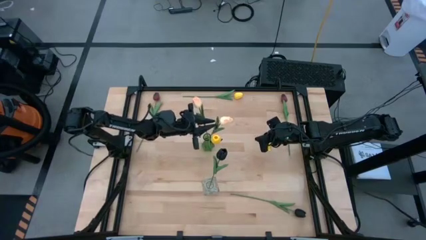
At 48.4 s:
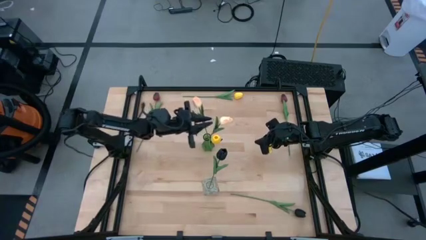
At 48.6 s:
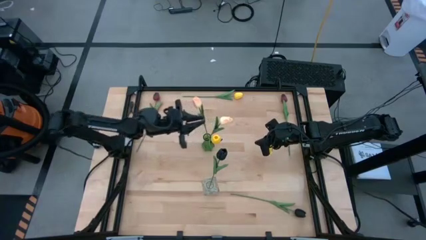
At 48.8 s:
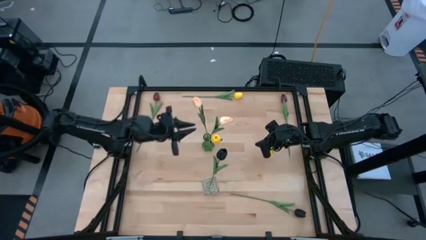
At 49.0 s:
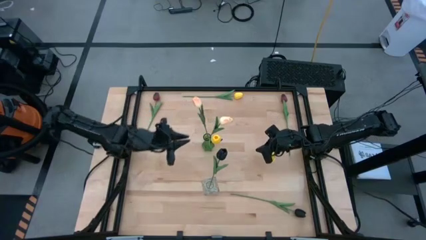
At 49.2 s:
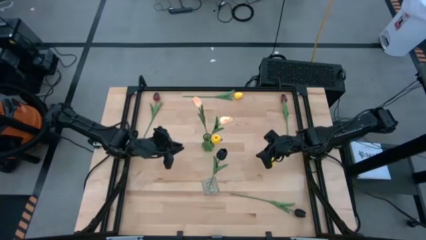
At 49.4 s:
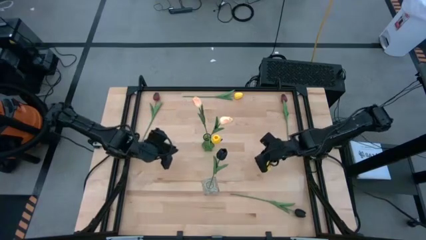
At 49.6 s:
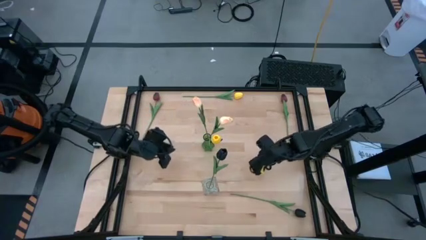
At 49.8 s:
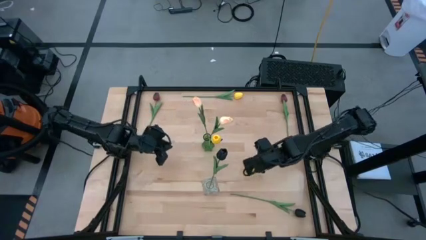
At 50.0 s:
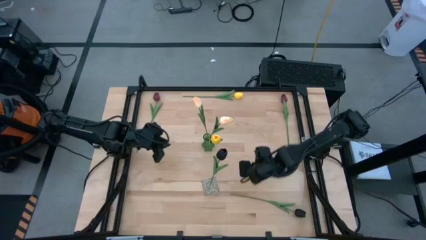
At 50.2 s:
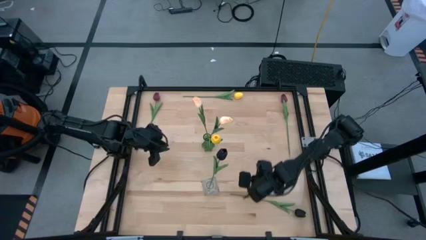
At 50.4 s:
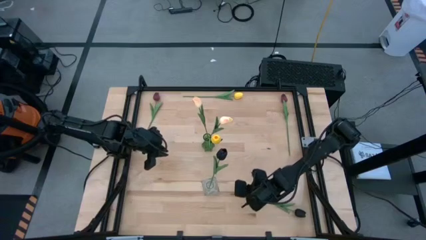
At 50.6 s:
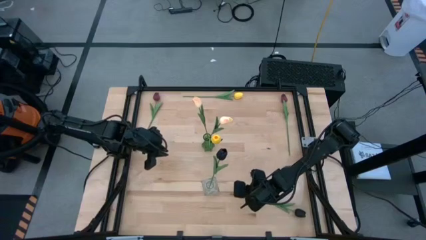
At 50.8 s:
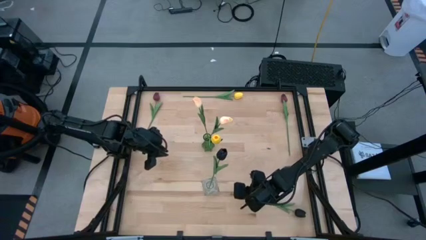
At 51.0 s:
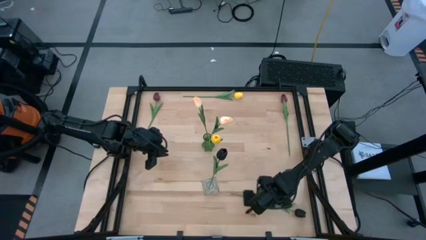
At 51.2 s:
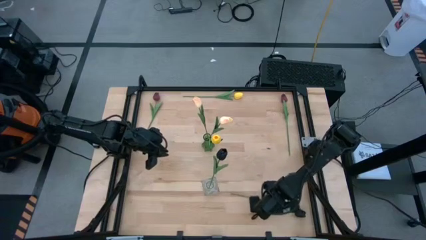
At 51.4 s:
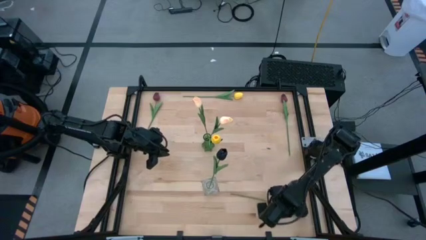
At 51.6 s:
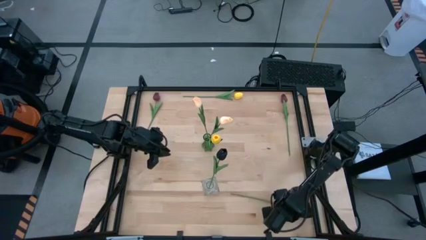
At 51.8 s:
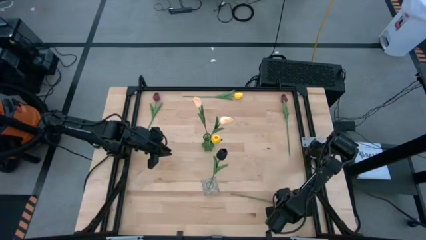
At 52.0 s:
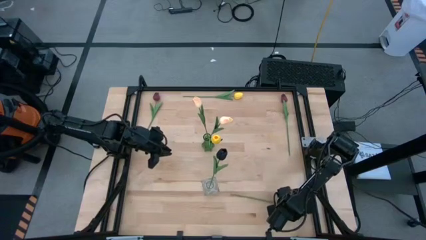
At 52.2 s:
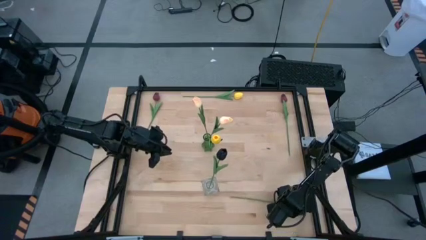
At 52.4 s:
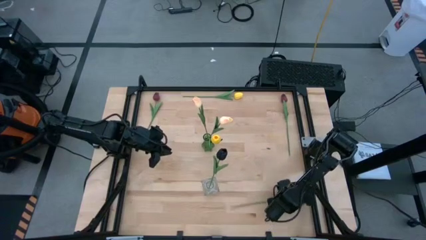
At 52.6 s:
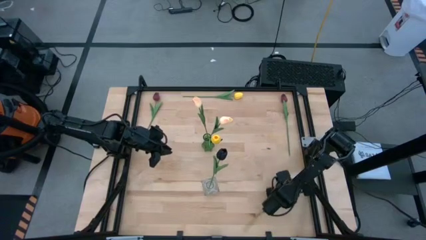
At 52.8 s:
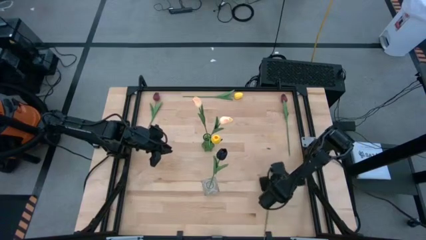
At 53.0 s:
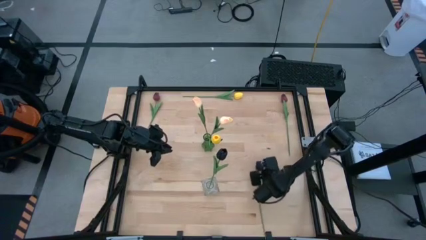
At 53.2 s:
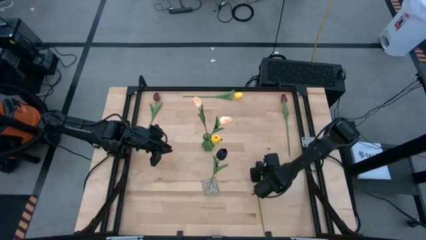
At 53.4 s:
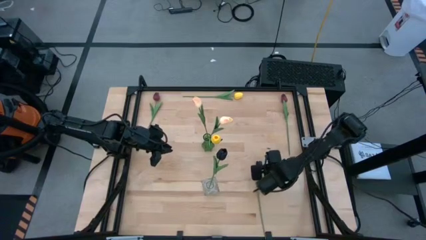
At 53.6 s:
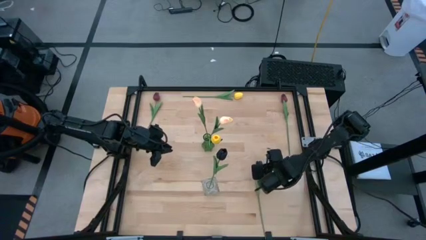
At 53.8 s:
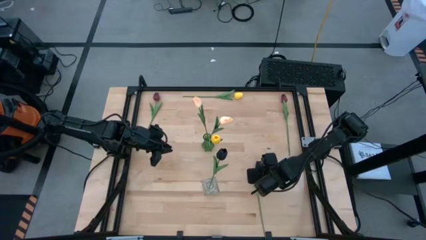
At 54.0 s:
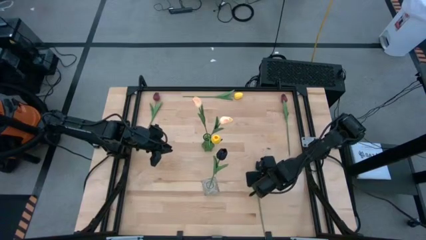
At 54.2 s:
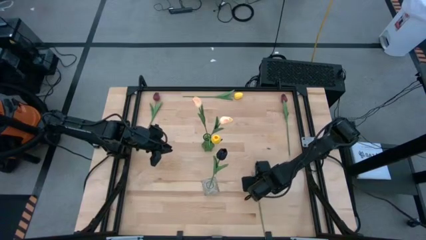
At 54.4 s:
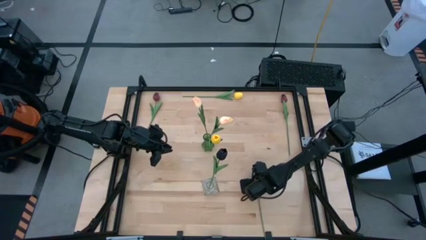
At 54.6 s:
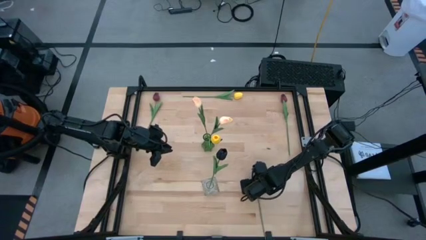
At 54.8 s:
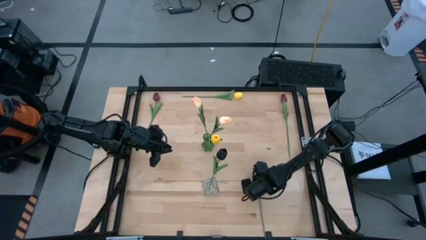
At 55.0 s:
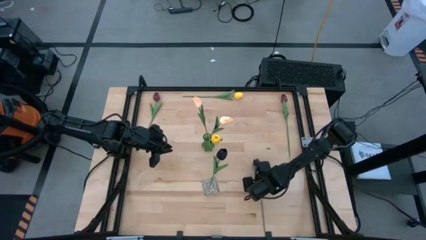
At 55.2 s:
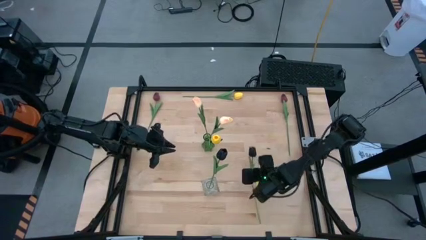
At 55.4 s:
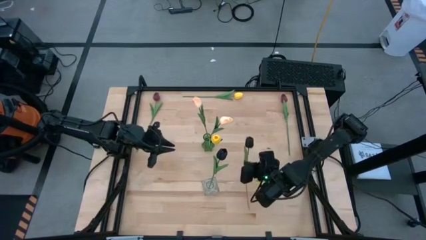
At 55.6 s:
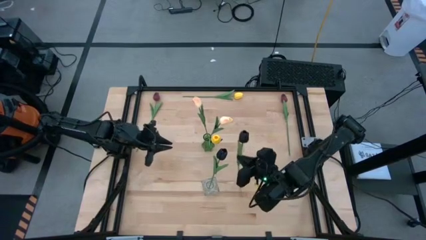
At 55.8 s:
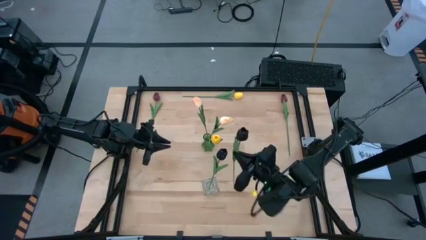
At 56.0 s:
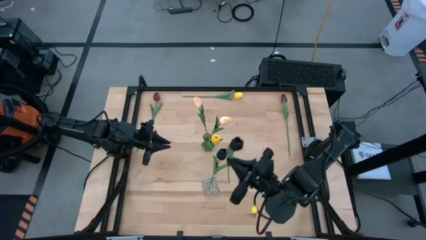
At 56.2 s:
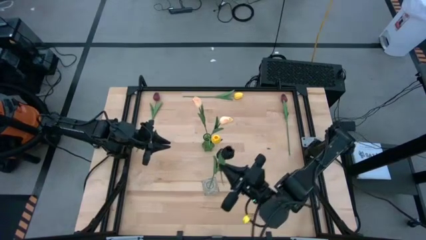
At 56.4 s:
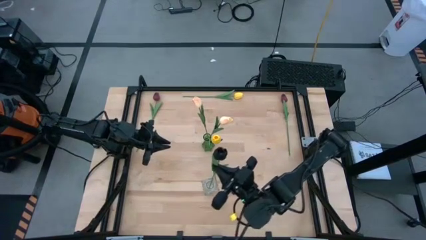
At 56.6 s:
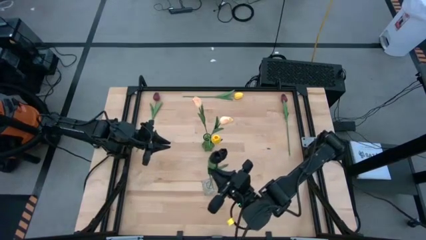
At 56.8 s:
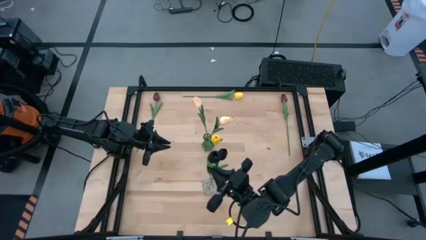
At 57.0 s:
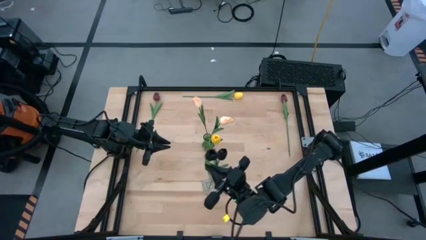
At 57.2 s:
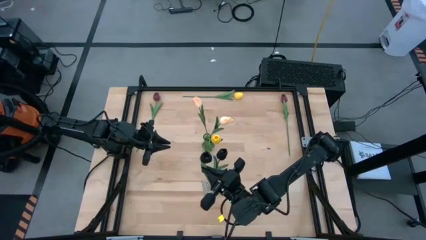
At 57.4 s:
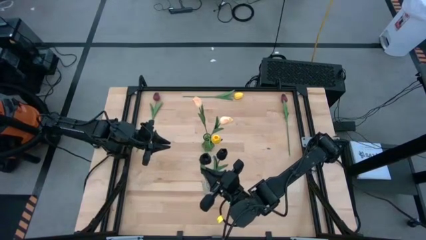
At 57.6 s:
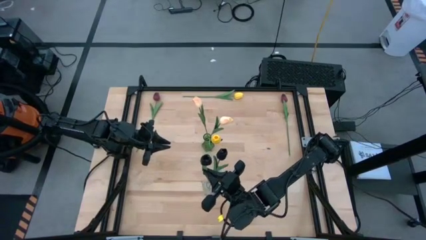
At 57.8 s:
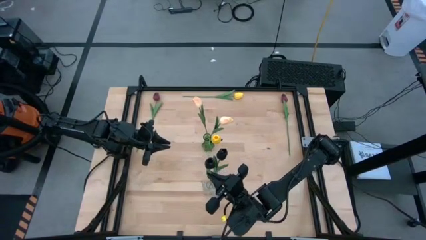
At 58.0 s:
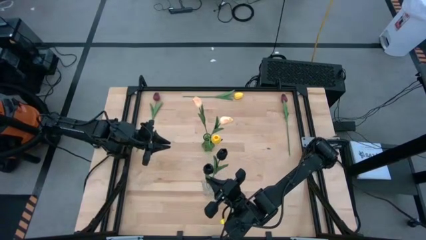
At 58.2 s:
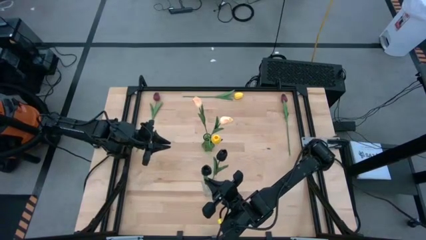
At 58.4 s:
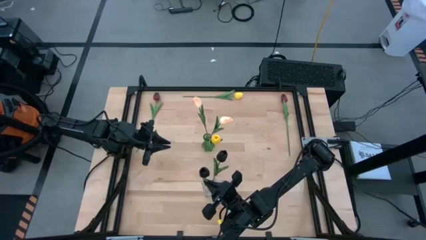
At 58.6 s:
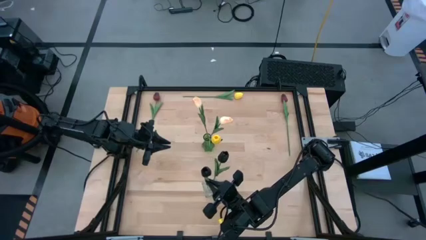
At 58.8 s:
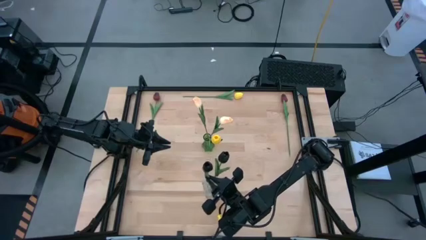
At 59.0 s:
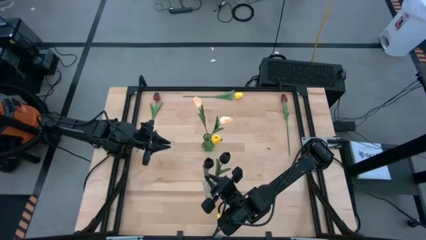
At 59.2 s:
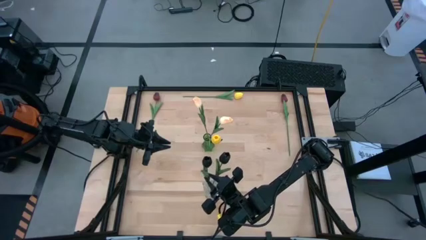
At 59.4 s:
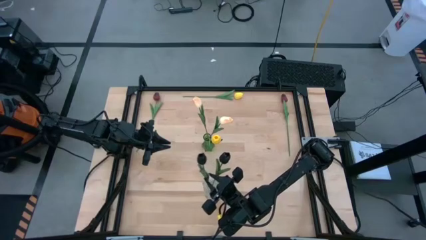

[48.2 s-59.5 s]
Task: Sort flowers into vase by color
Put the black flower into the transparent vase
